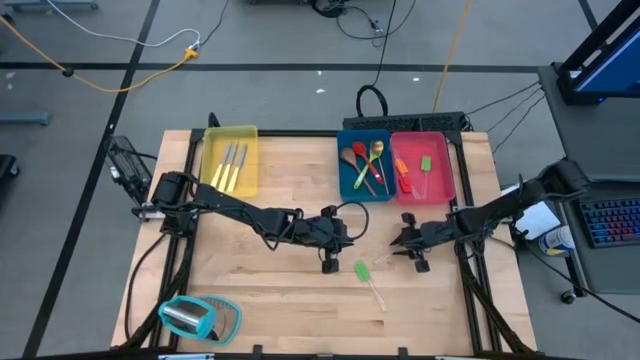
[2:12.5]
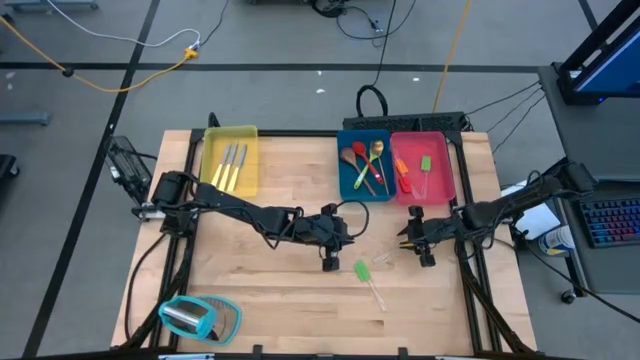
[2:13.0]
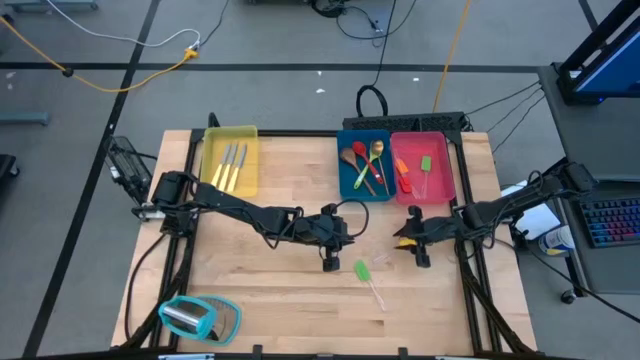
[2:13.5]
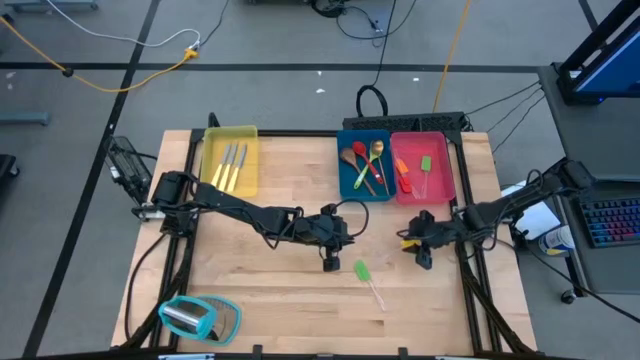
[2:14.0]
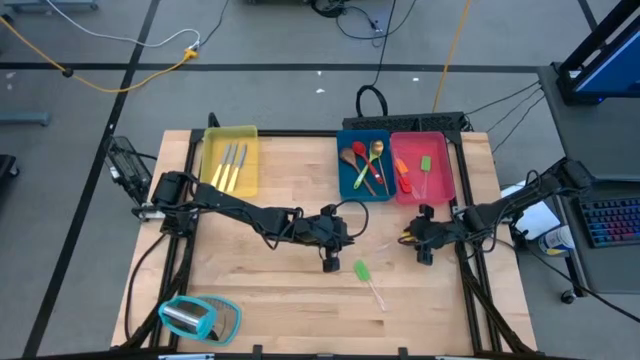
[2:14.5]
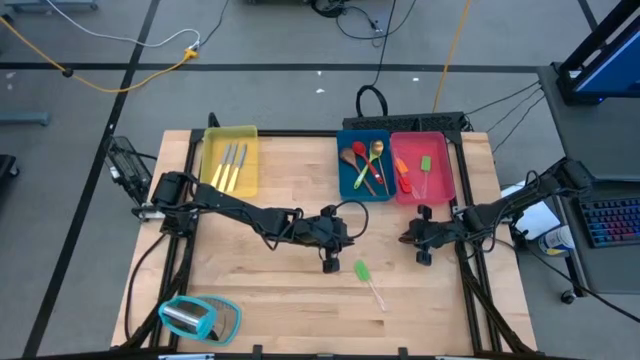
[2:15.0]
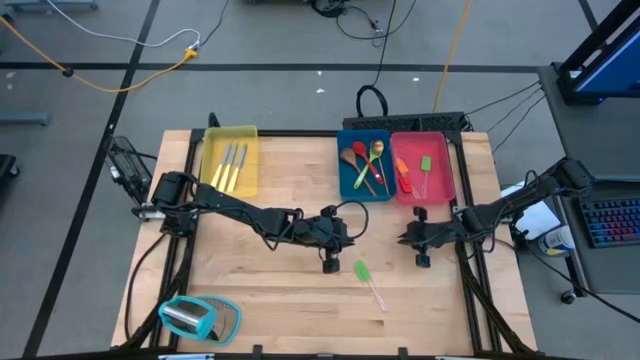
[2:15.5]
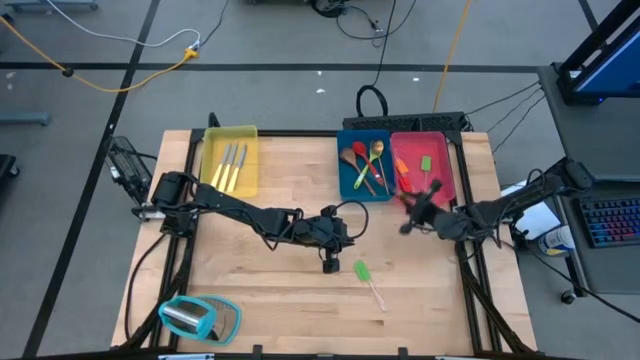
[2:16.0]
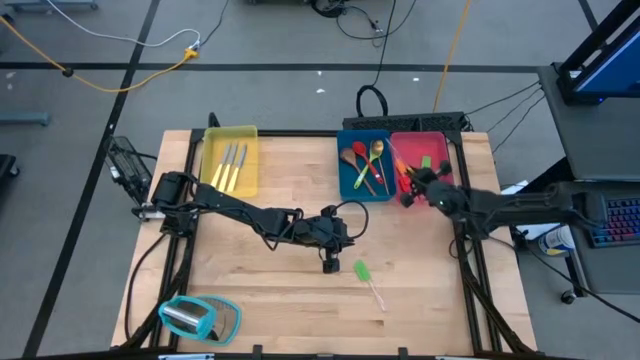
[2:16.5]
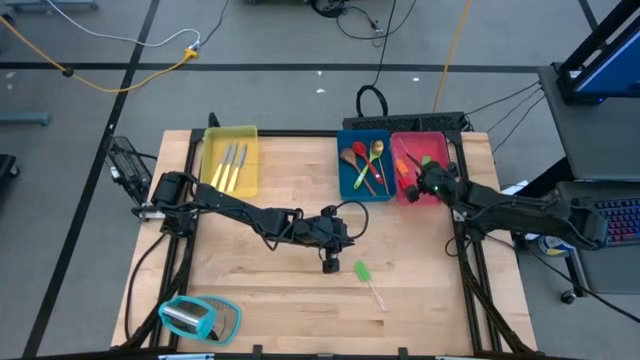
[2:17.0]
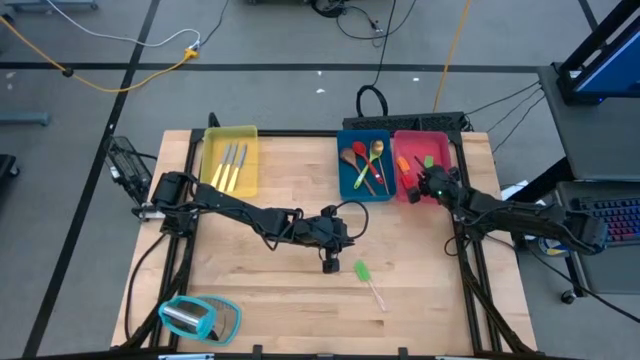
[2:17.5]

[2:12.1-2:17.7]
Task: Pick & Place Kitchen Items
Put the yellow spatula into the pink bin

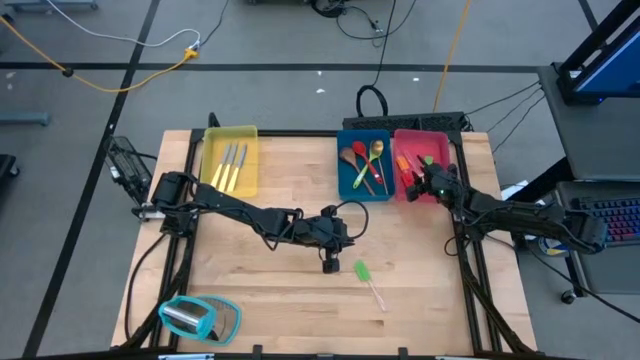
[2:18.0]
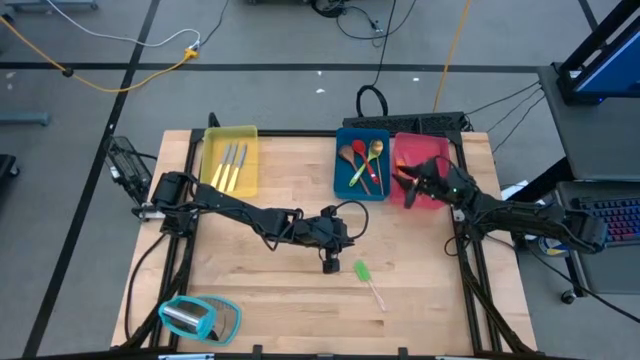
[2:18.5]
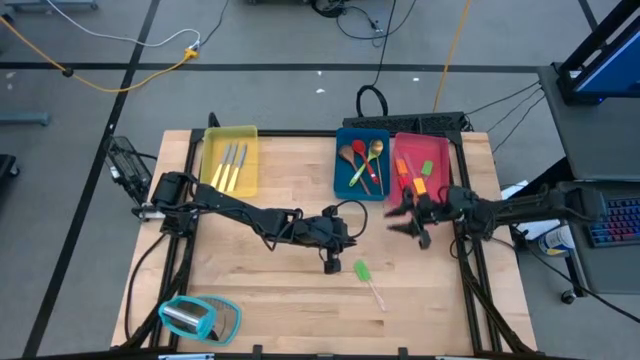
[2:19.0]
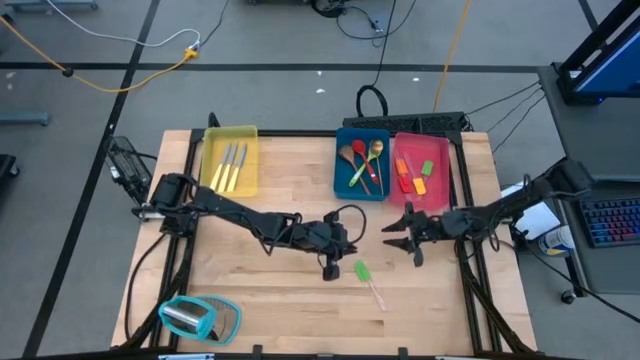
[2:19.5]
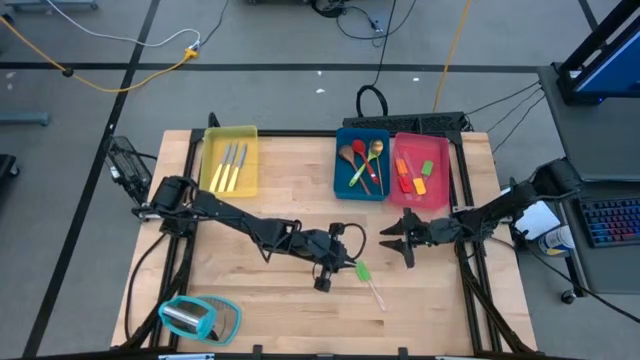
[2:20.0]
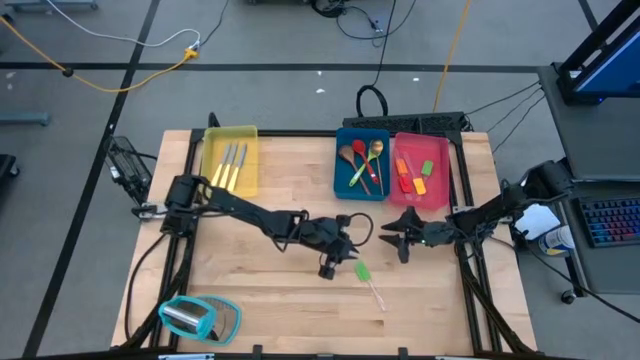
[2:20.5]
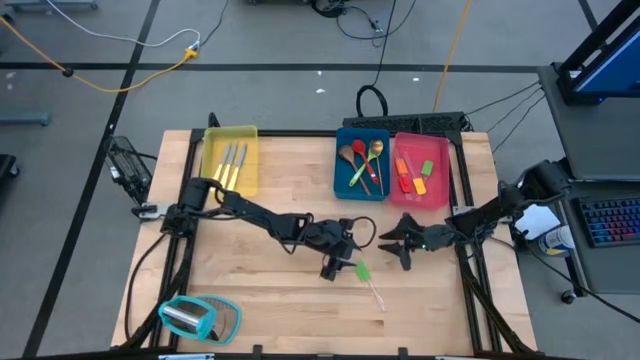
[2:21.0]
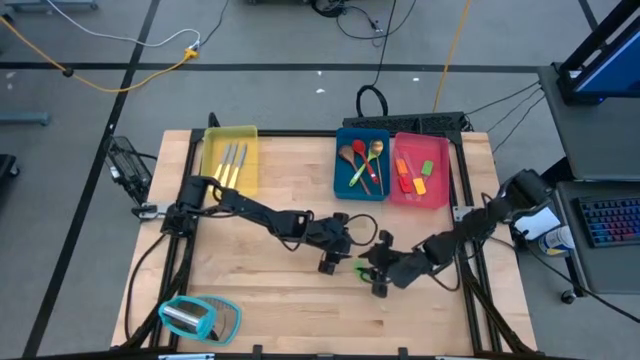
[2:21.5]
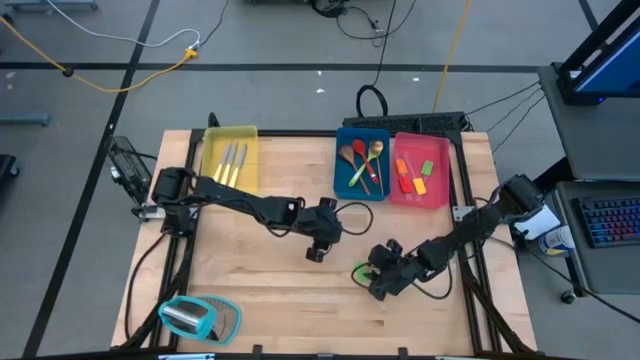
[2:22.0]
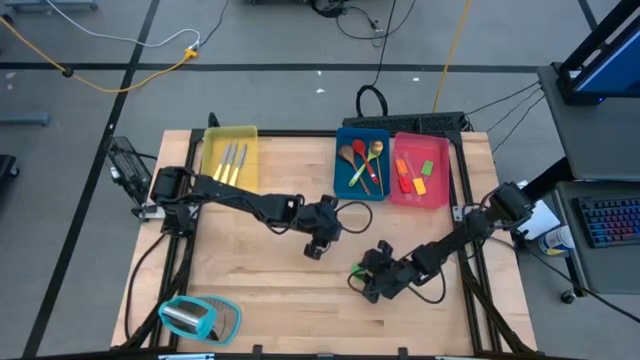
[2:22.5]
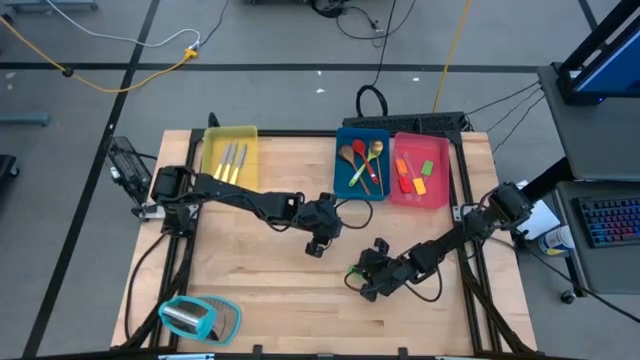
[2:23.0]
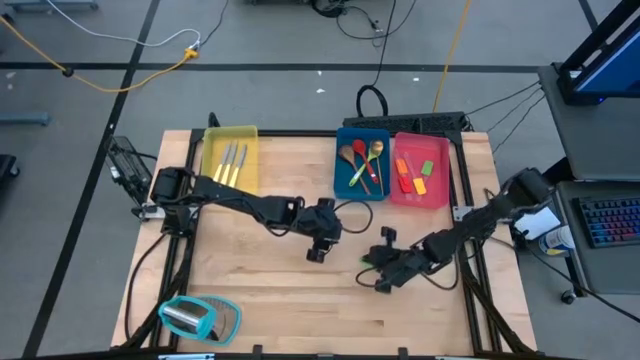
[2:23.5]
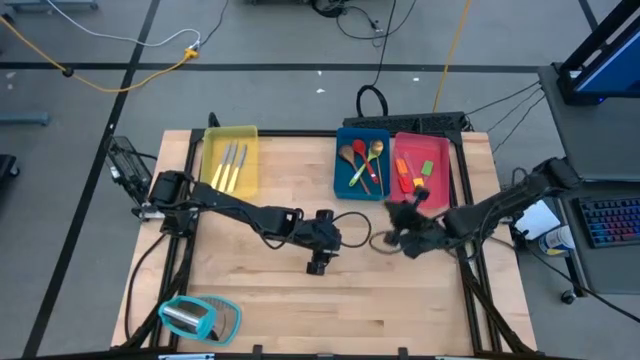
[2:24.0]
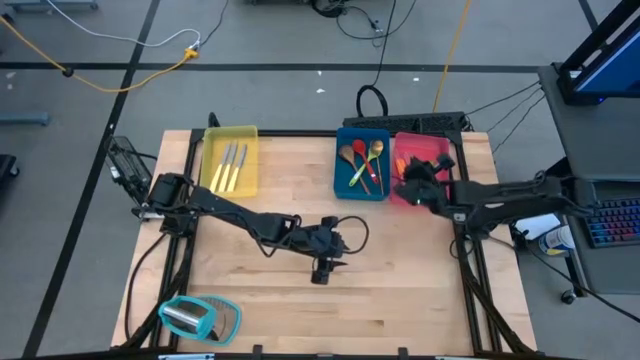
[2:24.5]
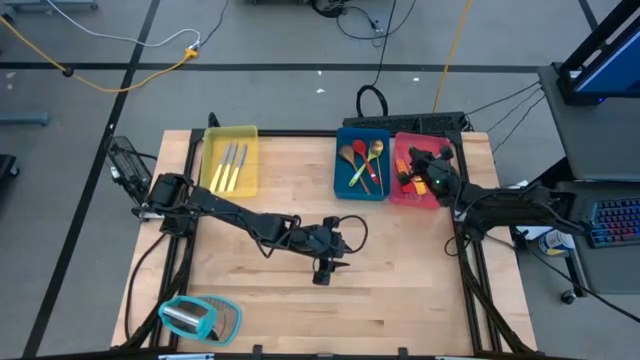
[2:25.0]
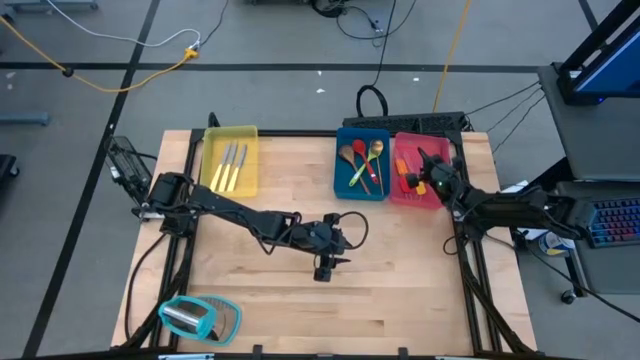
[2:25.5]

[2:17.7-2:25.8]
Put the green spatula into the pink bin

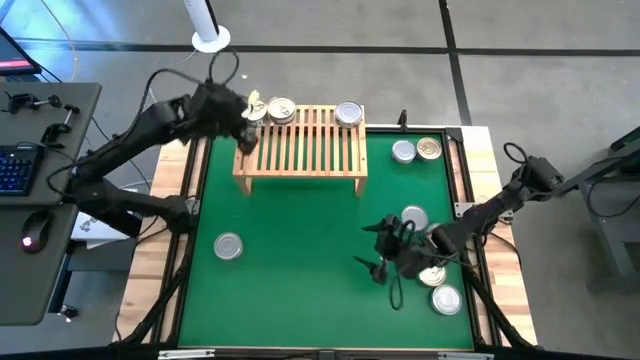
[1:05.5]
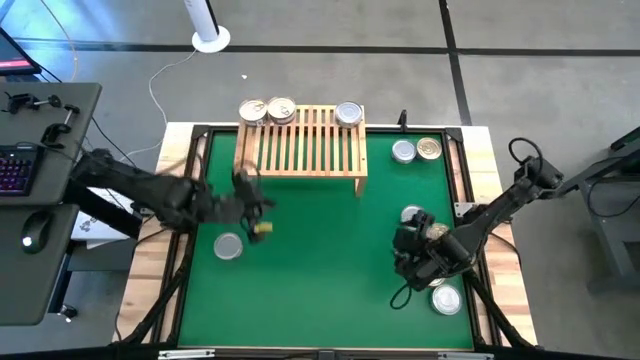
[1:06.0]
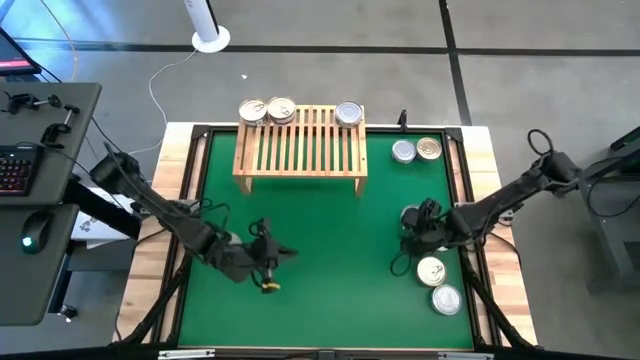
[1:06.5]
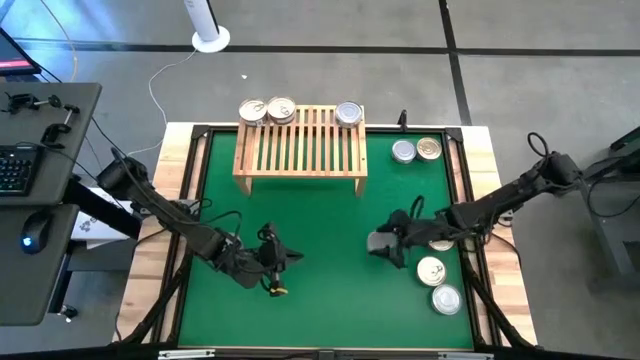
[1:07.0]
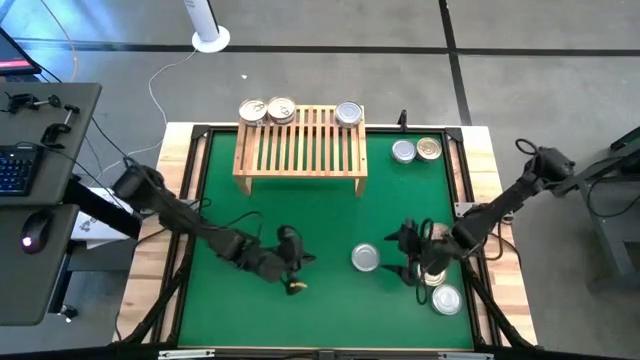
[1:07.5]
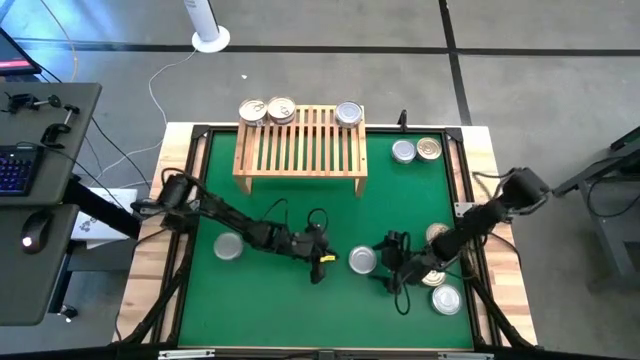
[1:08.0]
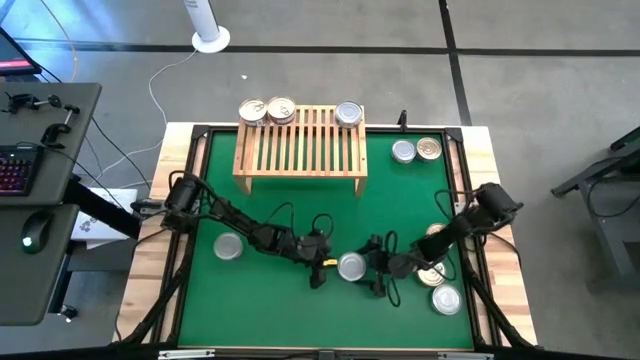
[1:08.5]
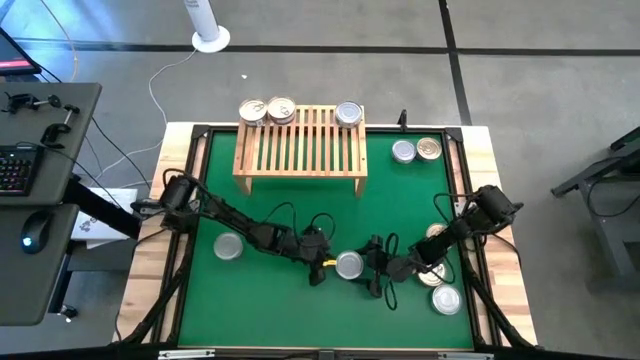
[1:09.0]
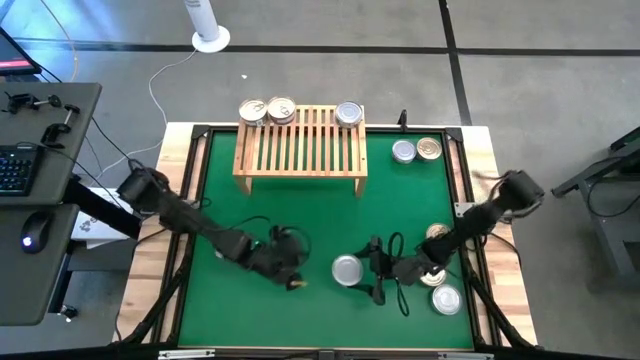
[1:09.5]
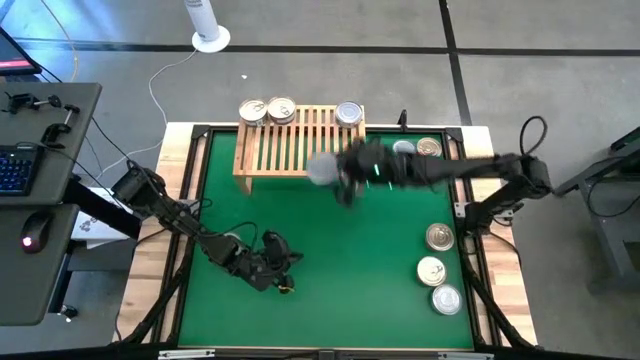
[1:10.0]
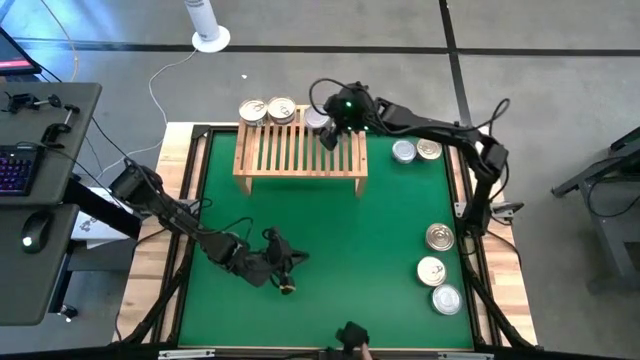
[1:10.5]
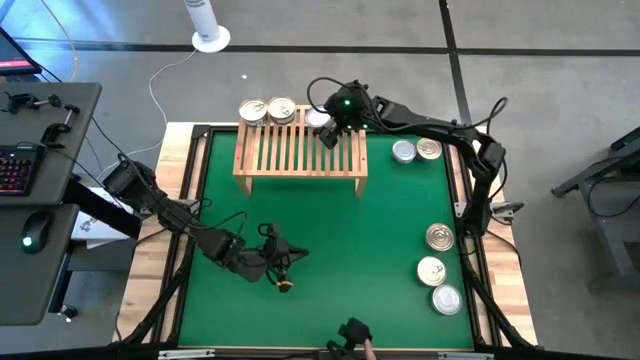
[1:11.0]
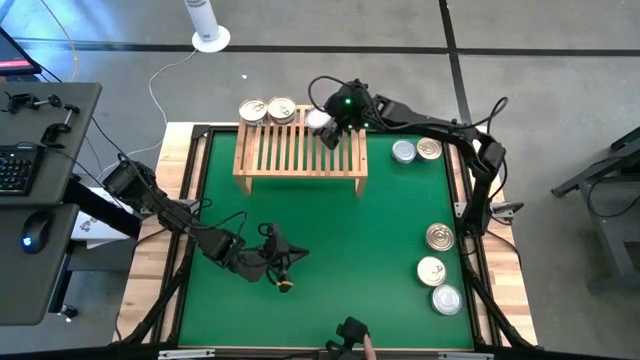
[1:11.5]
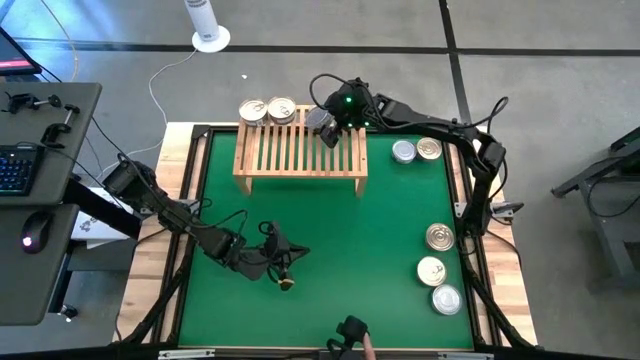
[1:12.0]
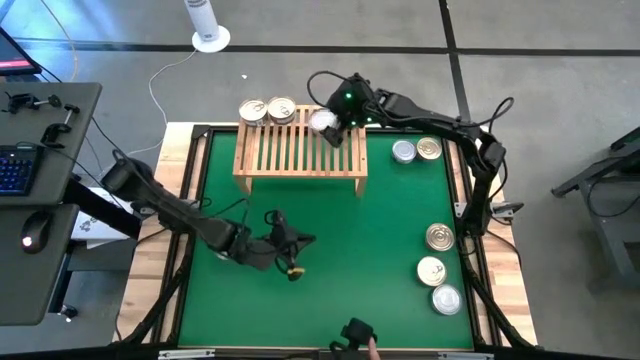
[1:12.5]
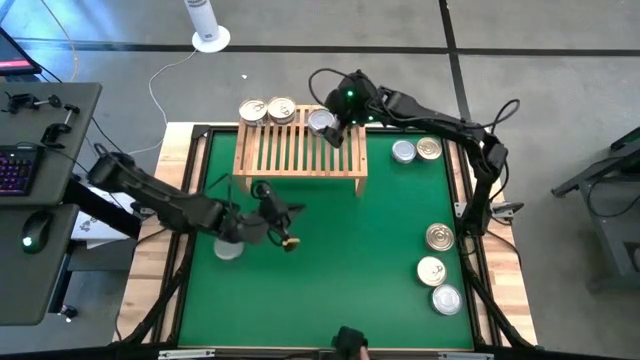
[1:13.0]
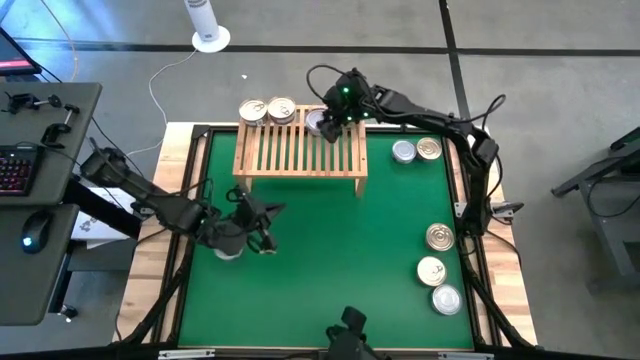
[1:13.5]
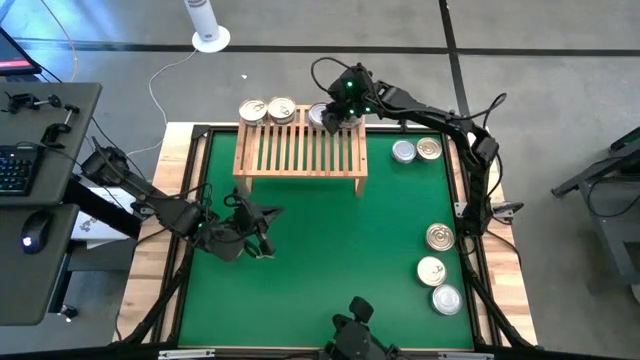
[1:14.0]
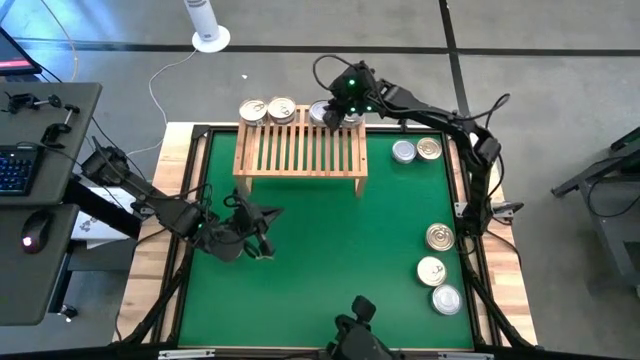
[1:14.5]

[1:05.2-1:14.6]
Task: Stack canned seafood by type on shelf
Put the green white tuna can on the shelf
